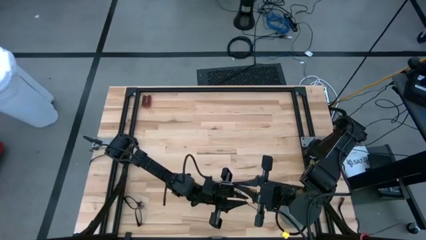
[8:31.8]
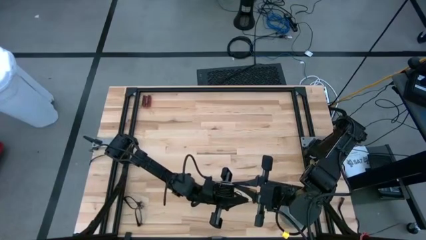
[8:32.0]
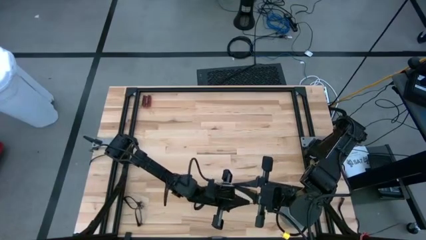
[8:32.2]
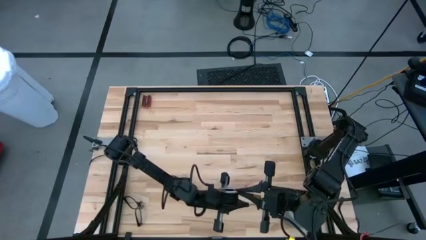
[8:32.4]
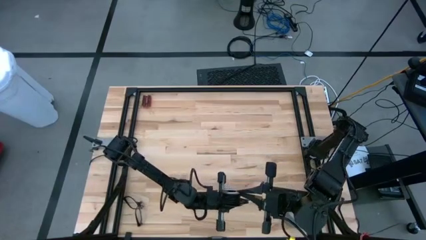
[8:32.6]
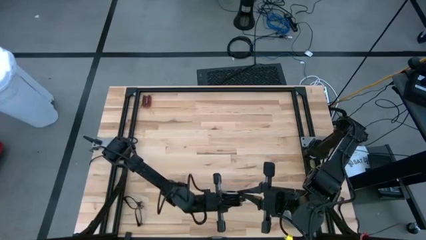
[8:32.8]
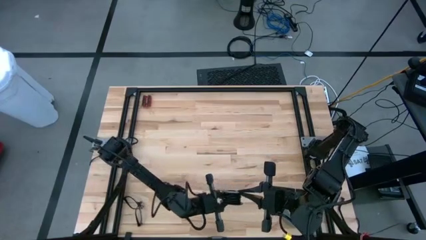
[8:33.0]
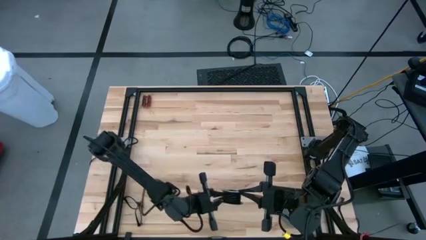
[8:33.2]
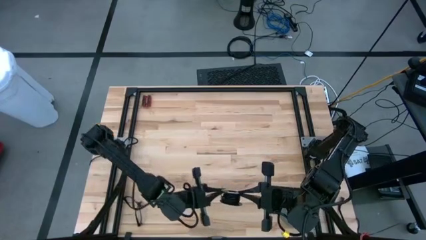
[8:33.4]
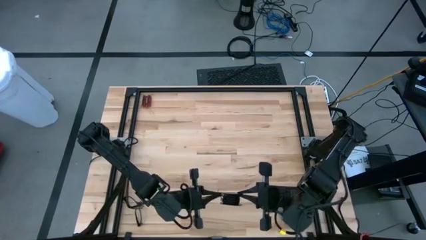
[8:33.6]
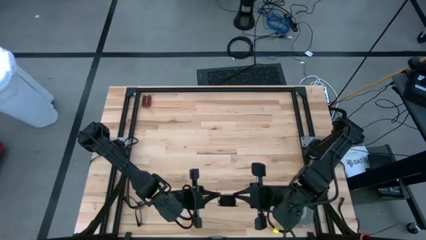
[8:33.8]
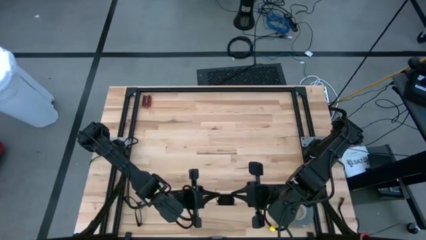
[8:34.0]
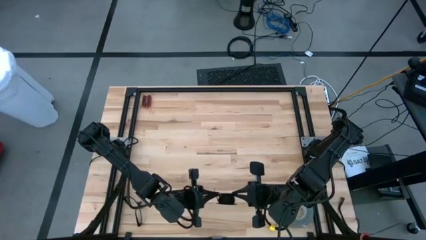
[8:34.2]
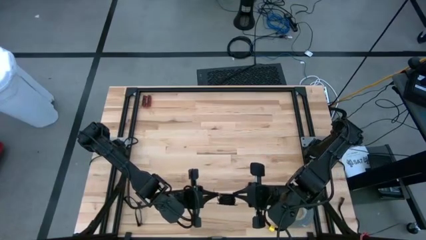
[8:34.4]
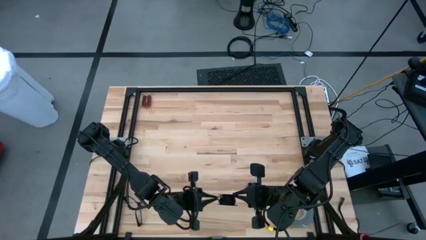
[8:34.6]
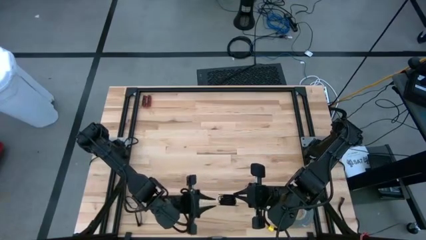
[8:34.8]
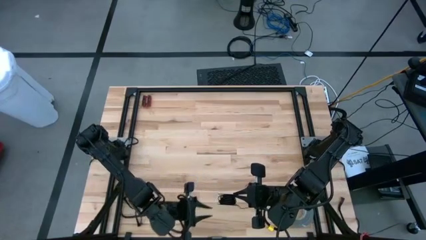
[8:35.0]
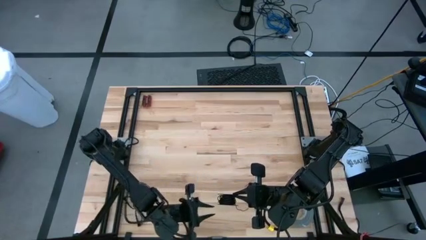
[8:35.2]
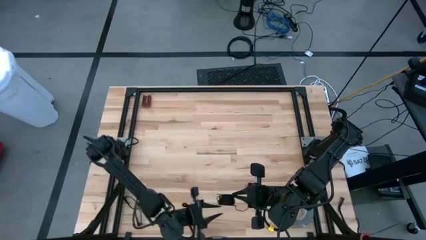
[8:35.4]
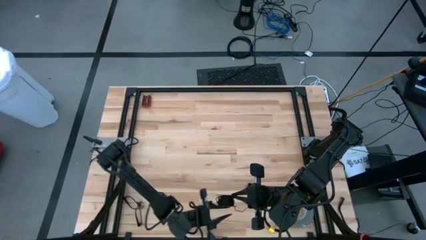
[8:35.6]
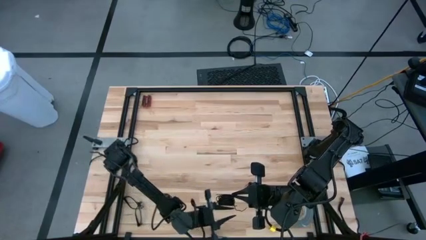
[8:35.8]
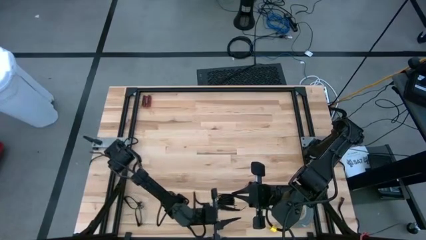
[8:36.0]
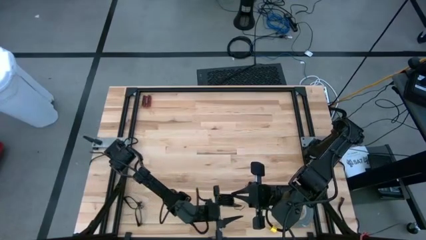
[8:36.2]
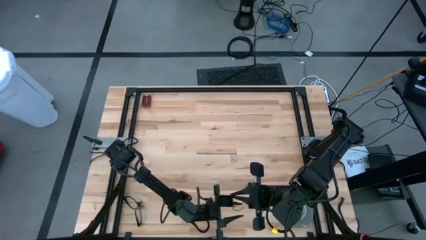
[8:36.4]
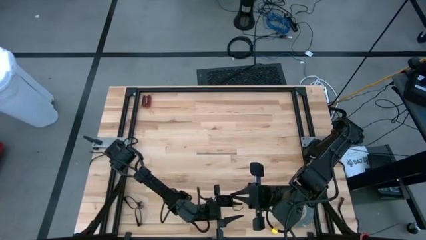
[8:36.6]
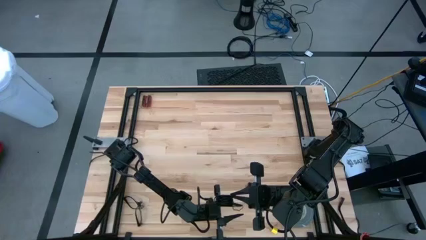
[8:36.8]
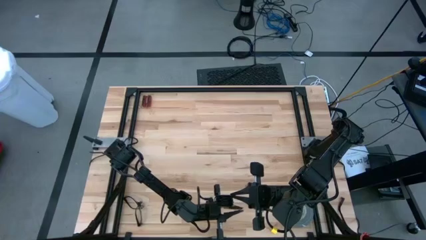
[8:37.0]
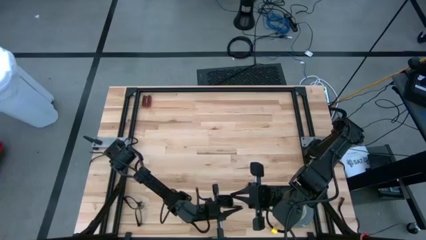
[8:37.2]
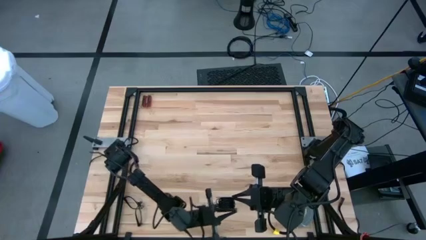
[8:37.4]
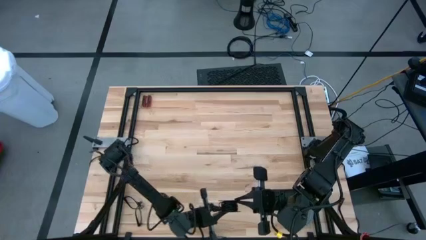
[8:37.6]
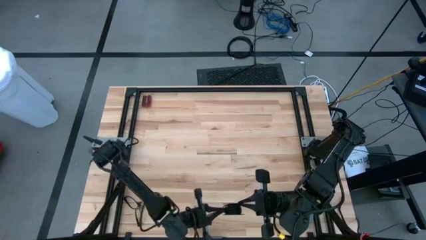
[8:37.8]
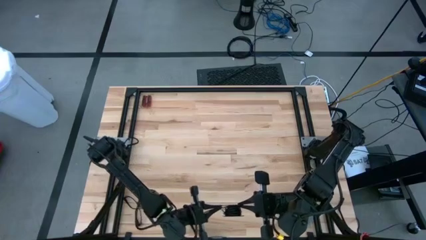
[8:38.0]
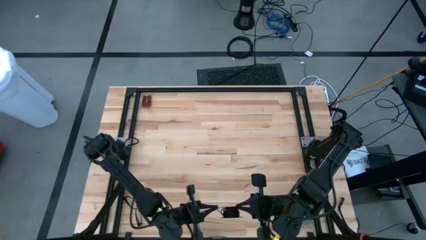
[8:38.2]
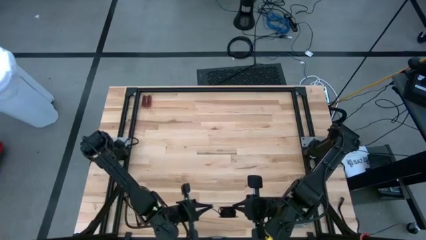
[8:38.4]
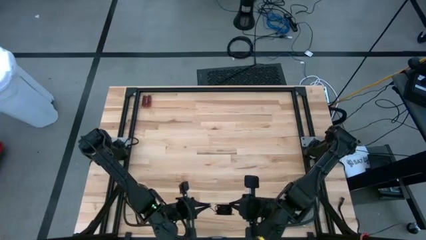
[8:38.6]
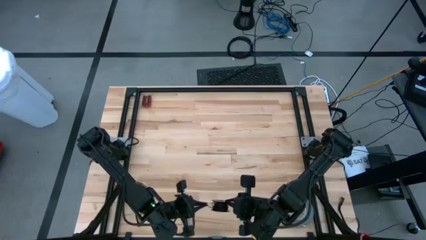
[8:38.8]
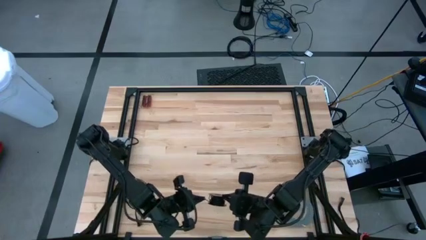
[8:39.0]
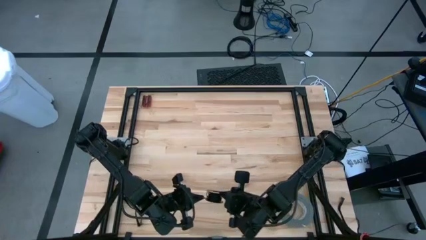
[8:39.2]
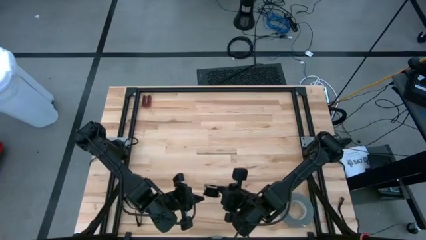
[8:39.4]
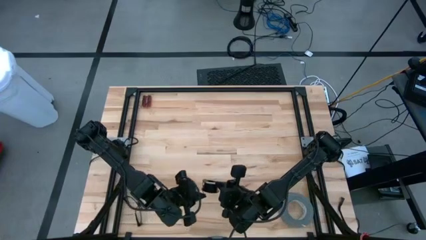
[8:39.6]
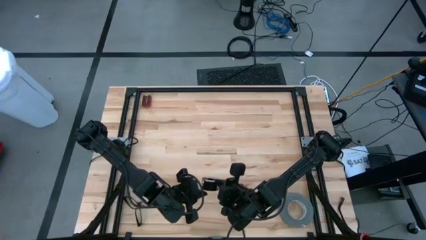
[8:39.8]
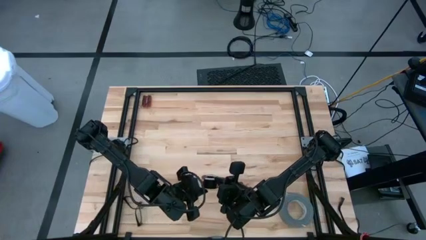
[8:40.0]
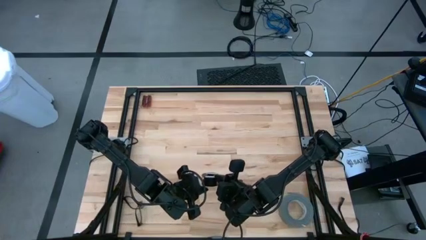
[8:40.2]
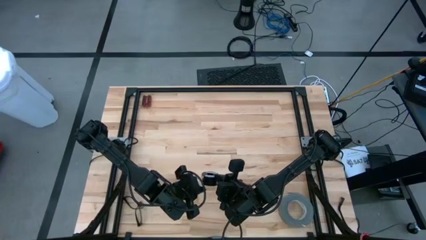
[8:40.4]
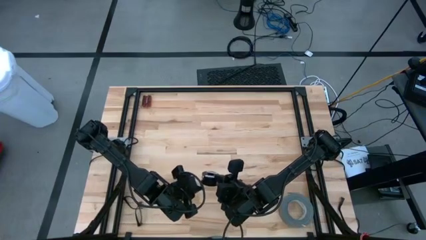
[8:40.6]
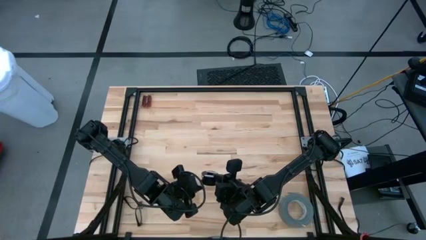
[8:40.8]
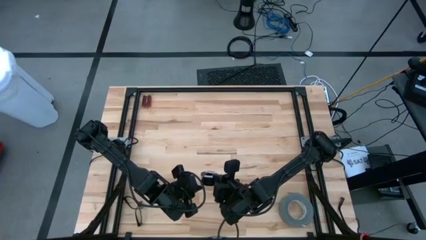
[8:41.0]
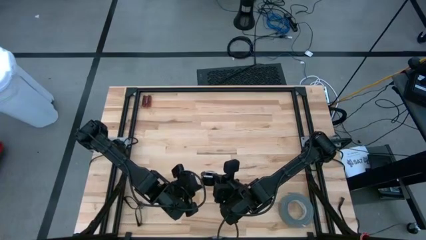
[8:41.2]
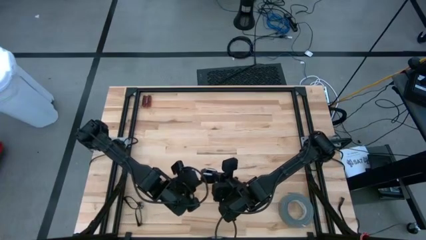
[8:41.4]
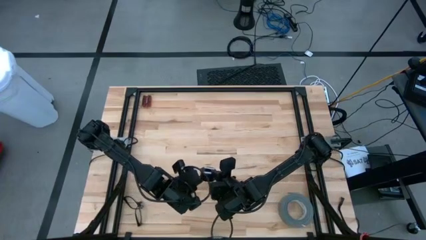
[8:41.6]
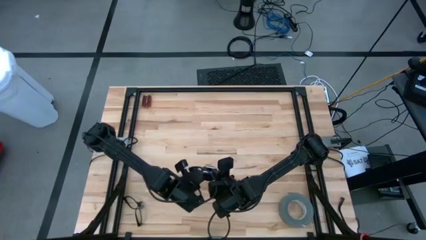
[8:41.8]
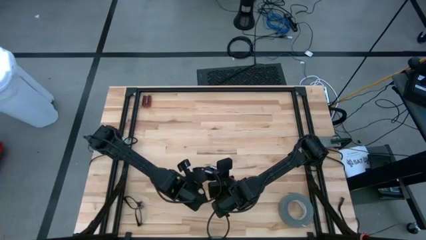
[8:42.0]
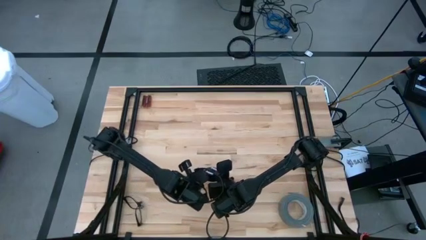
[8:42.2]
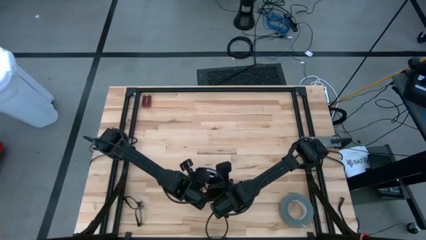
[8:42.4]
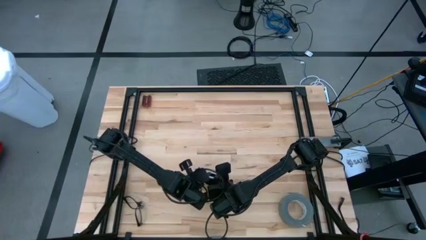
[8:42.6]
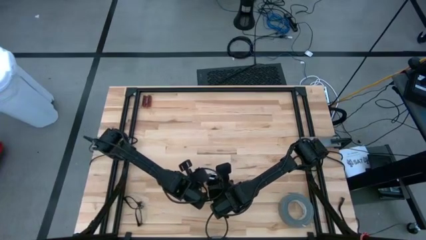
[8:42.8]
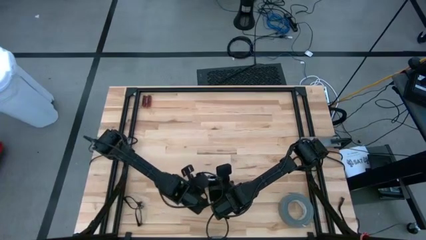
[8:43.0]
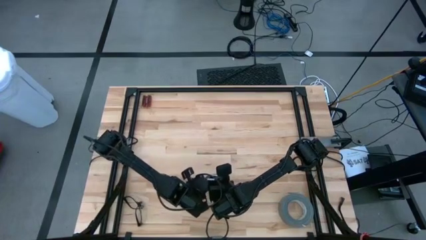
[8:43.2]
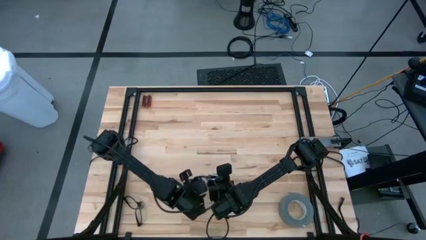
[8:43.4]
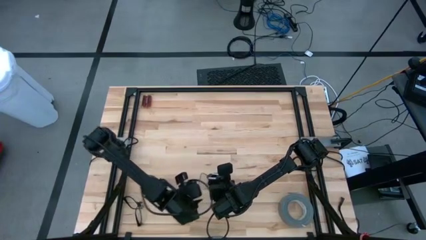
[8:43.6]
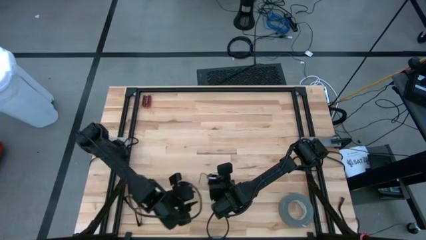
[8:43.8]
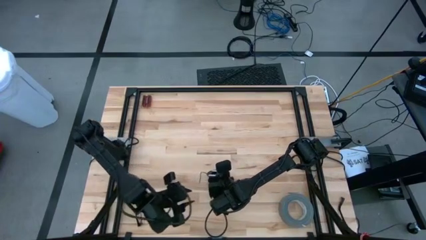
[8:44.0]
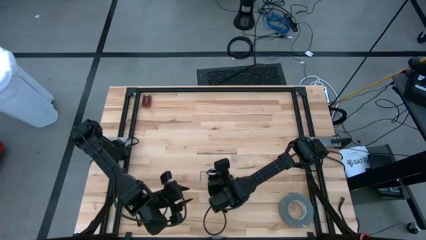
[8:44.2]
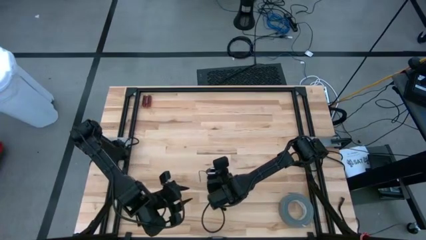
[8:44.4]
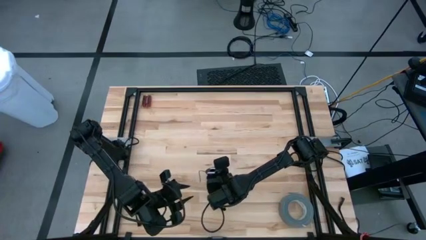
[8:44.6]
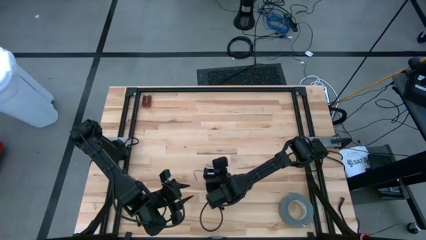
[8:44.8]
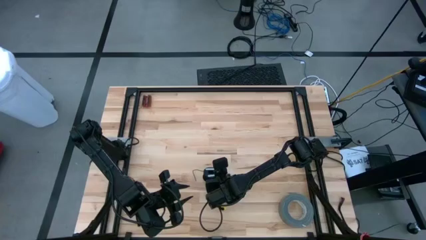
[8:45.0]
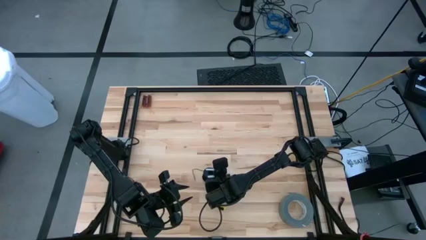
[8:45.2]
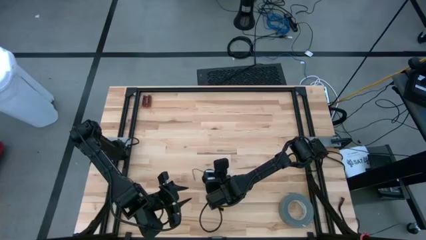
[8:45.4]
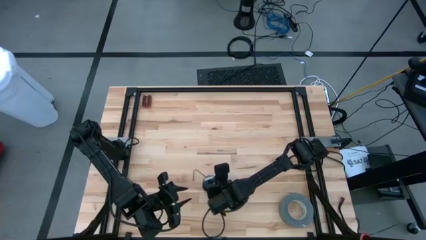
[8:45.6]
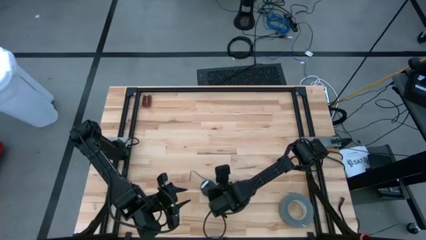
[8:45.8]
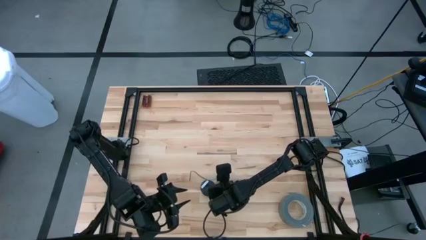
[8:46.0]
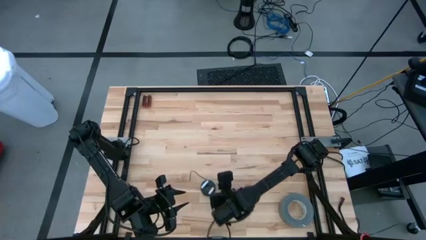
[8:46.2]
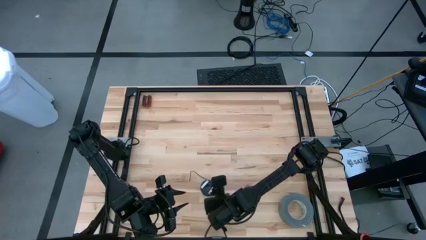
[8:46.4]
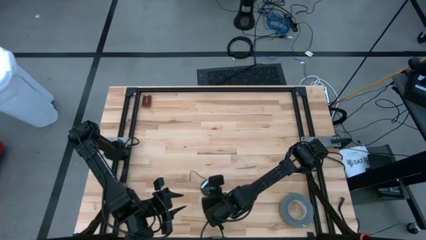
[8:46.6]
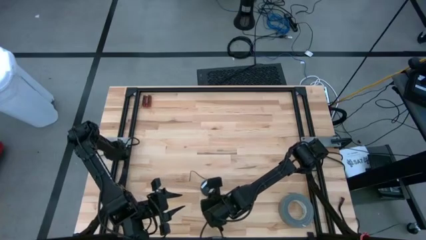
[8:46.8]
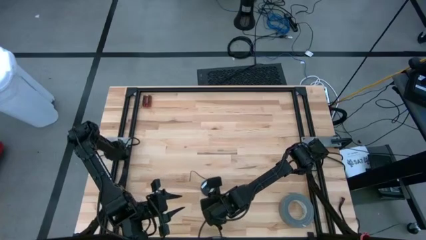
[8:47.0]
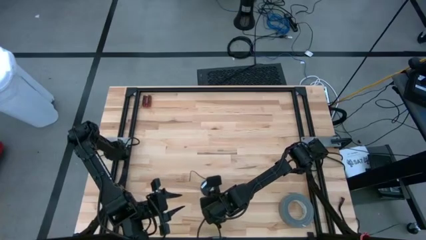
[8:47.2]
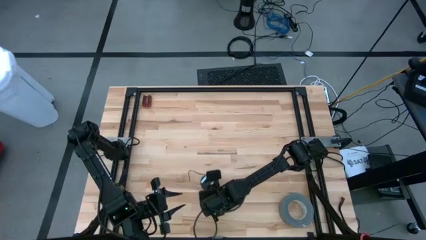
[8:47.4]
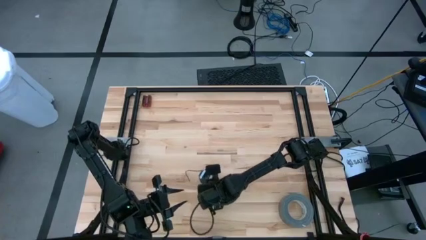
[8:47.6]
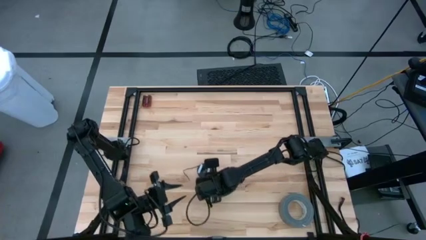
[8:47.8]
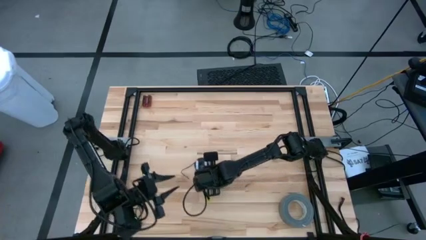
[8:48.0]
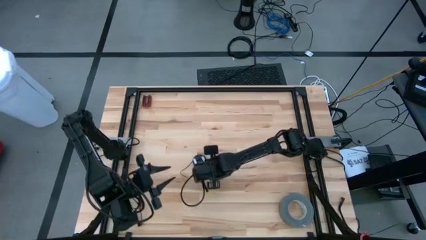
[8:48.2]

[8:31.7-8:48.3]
Task: Coil cords
Coil the black wire on the spool
